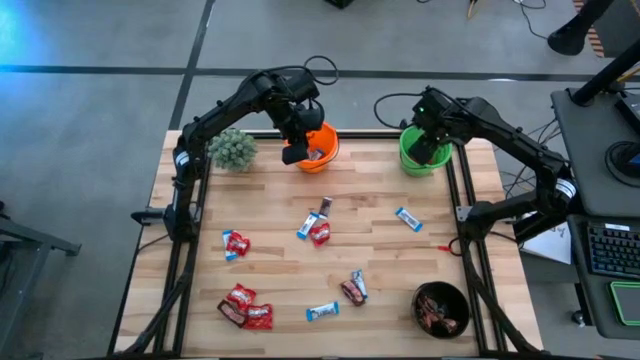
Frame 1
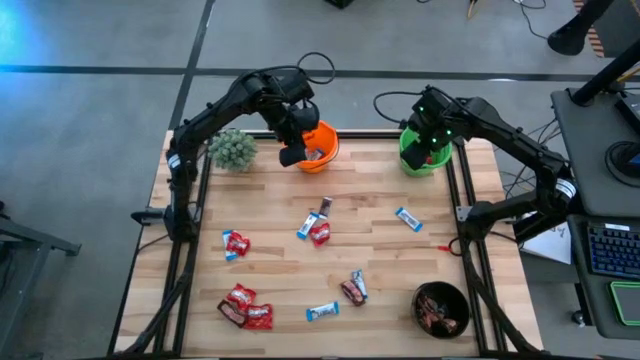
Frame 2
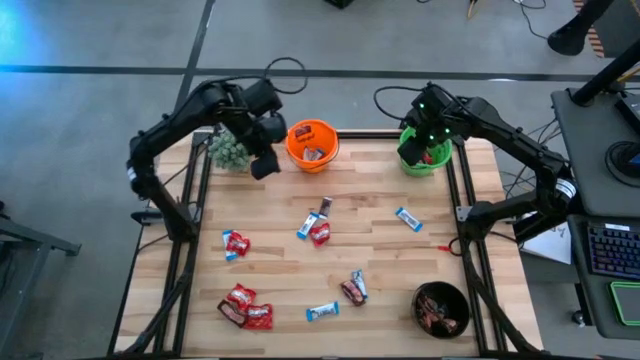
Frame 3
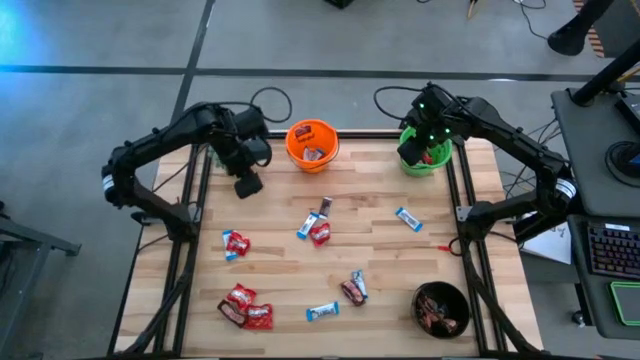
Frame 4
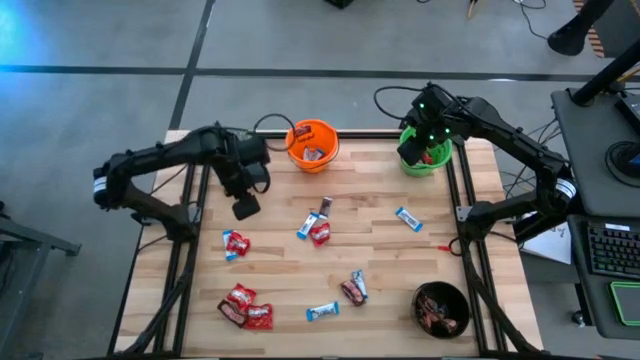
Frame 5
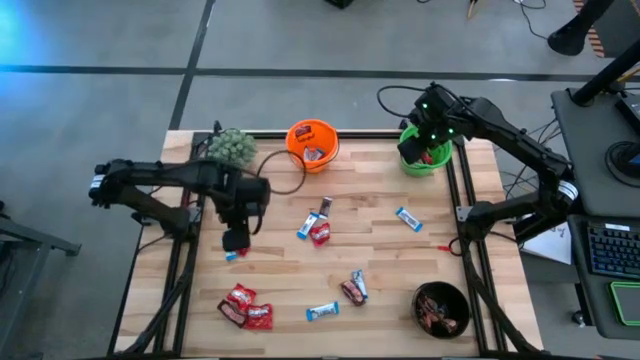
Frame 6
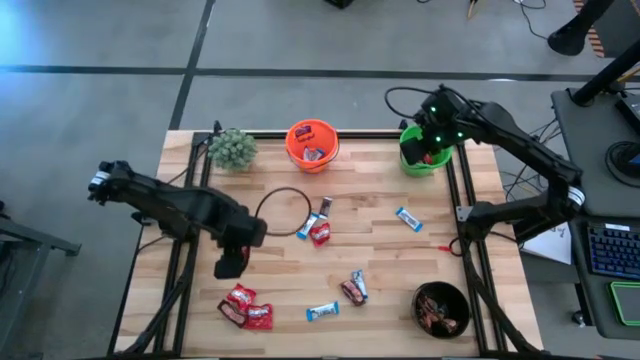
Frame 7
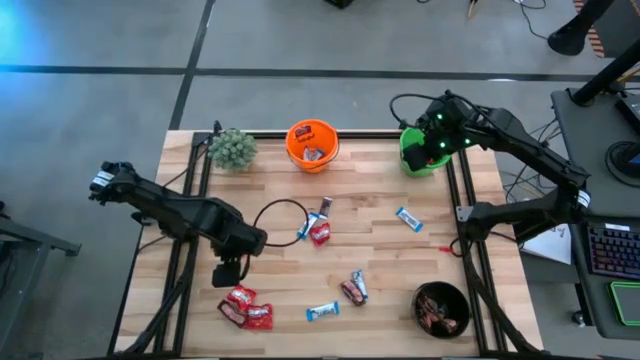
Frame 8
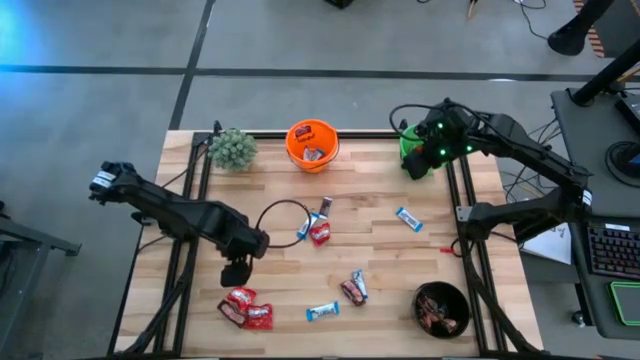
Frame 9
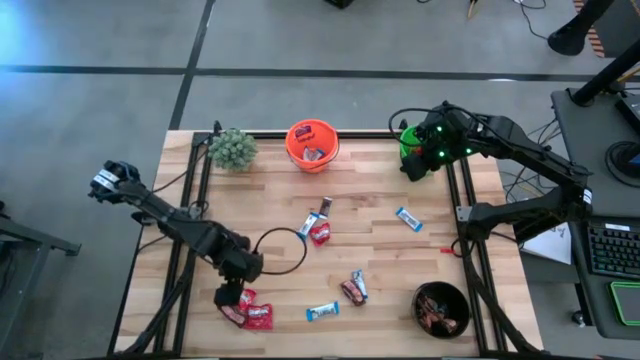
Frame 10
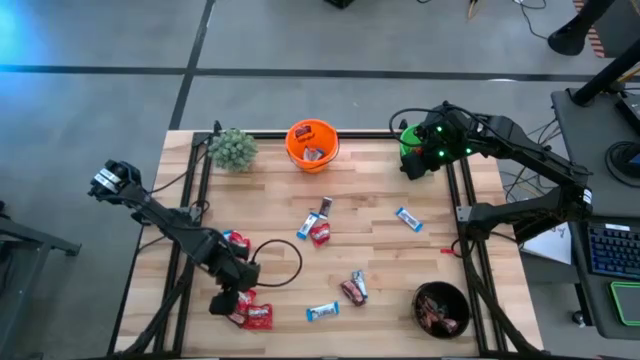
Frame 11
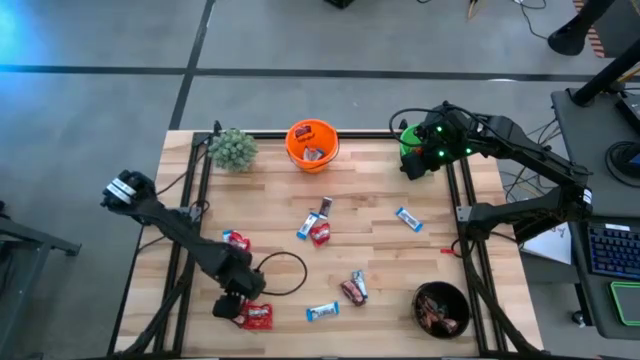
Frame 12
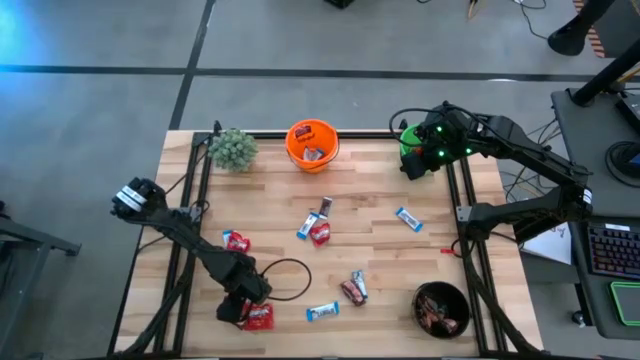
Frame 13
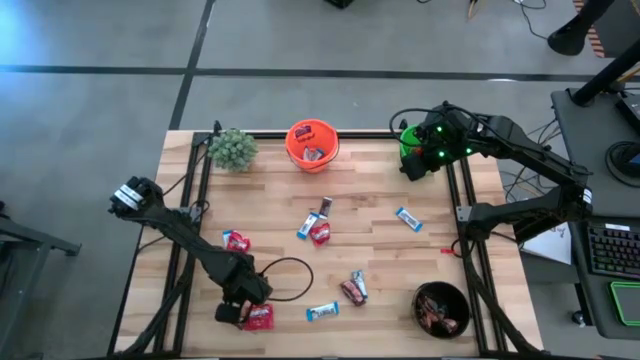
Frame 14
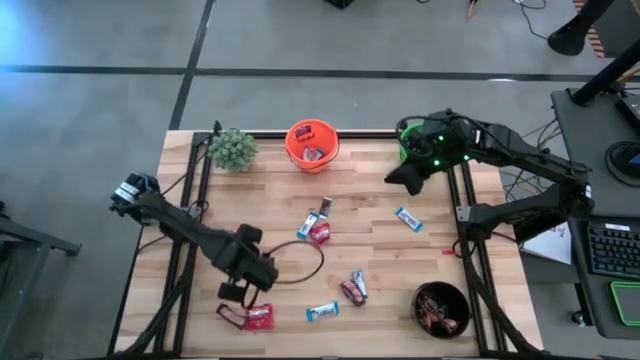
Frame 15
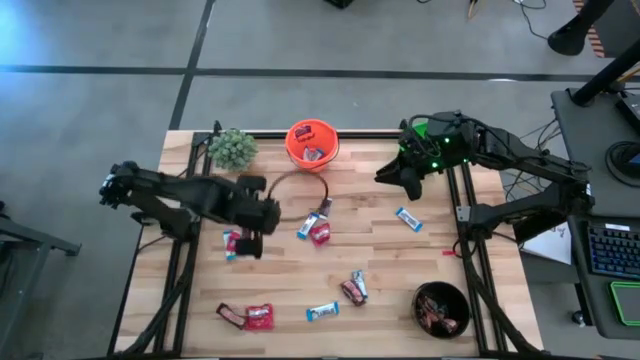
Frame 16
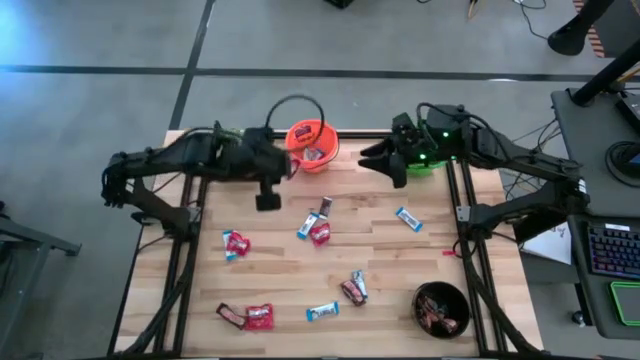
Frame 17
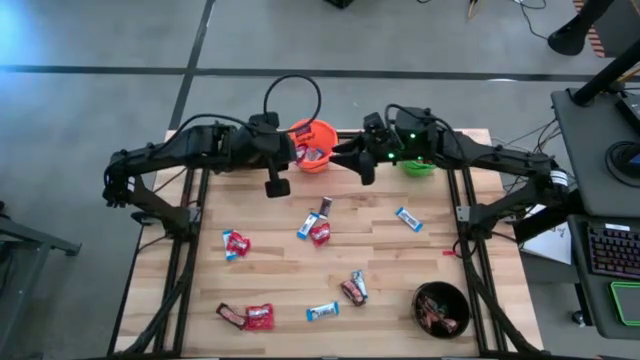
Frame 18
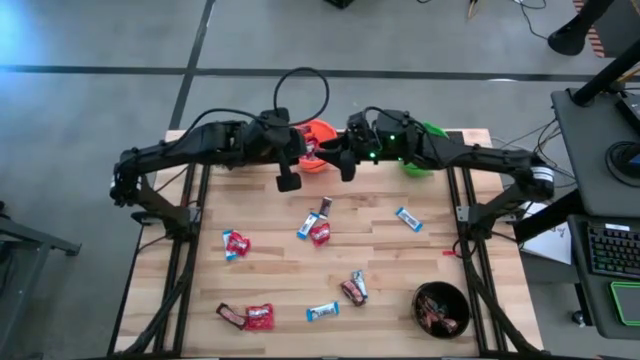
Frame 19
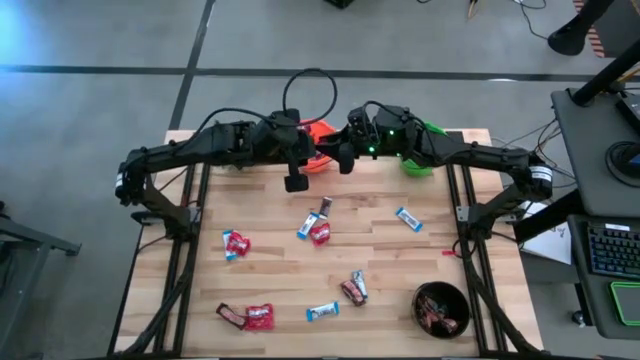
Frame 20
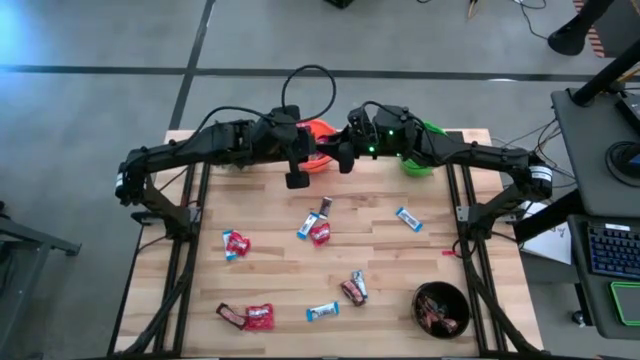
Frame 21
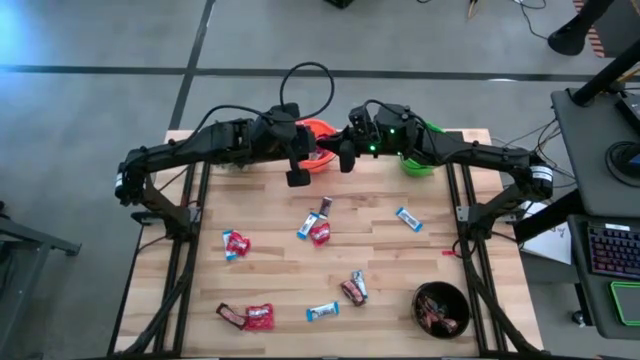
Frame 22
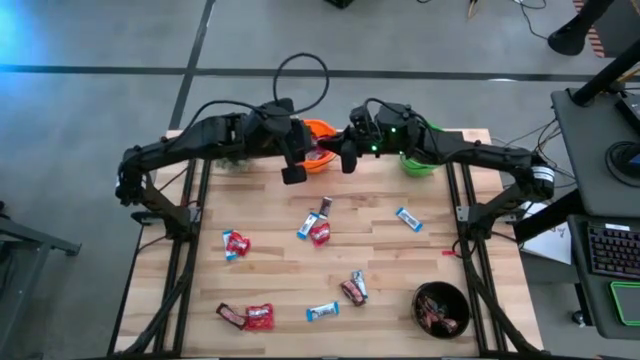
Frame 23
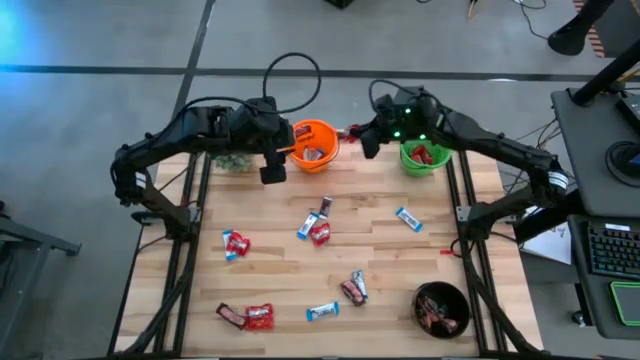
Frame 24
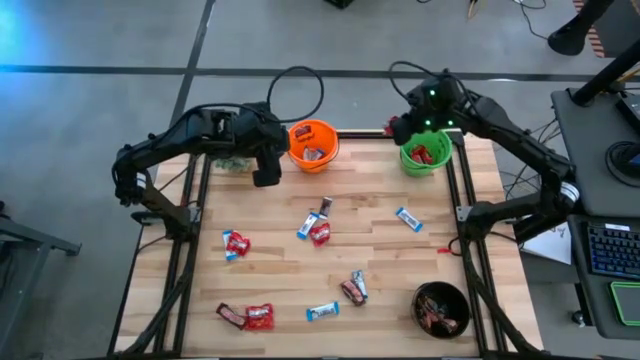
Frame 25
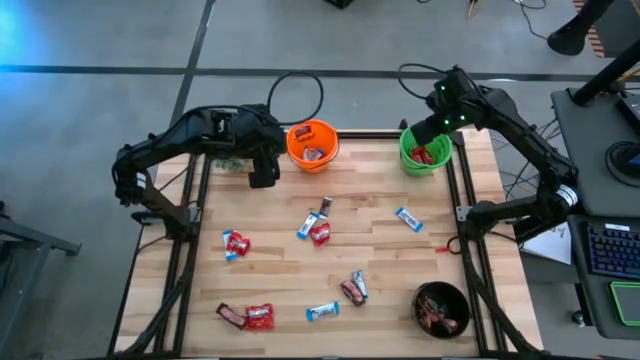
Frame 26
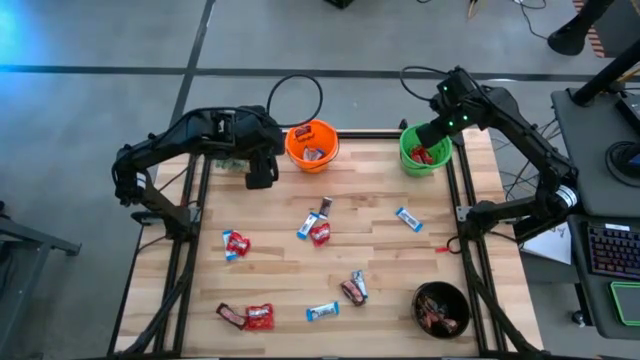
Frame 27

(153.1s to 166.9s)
Task: Sort candy
Put the red candy into the green bucket

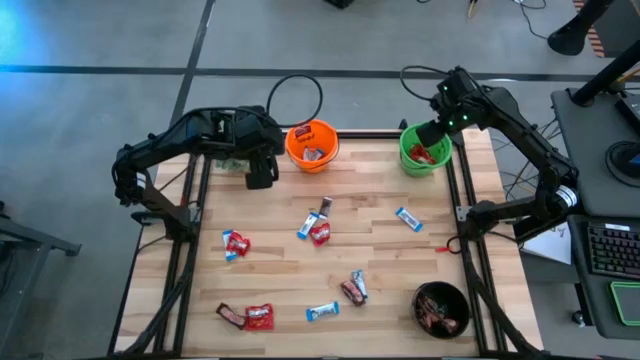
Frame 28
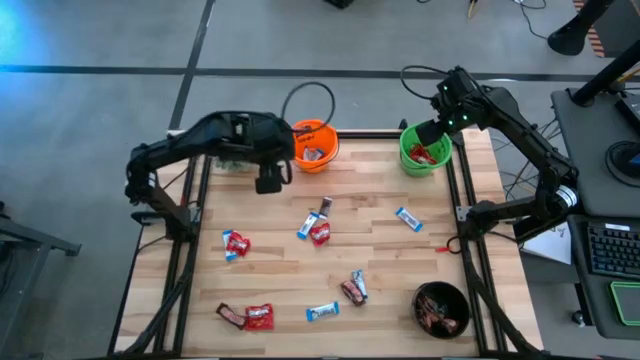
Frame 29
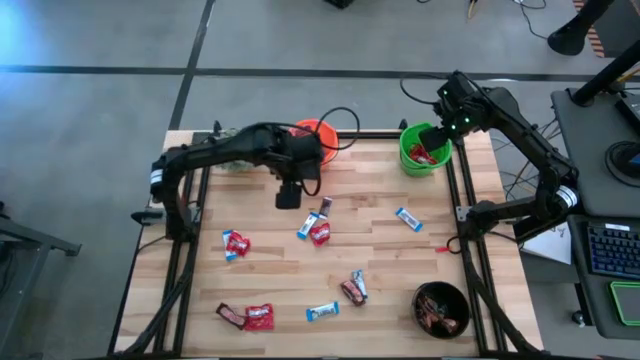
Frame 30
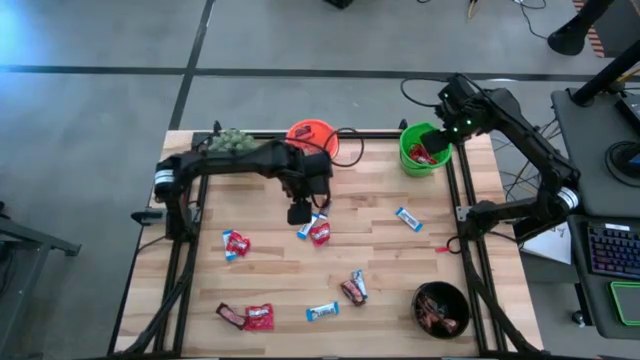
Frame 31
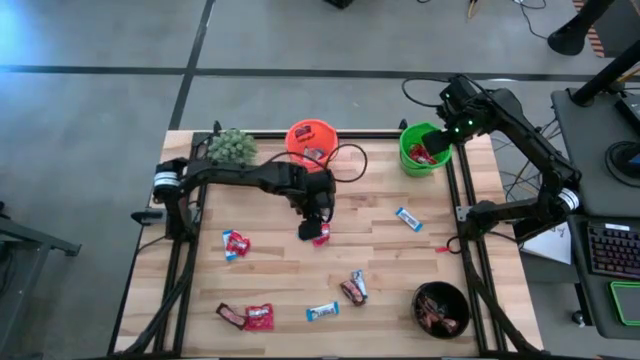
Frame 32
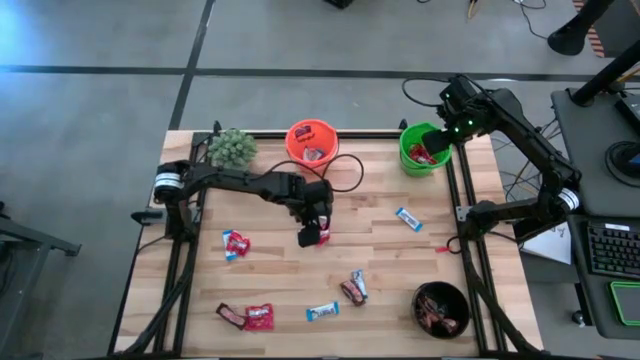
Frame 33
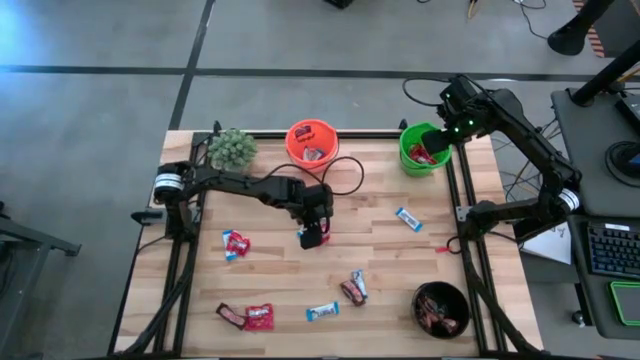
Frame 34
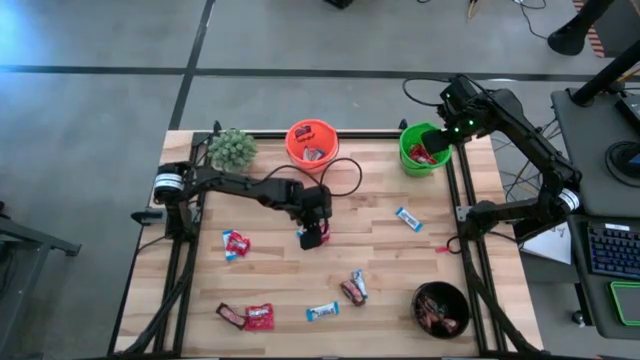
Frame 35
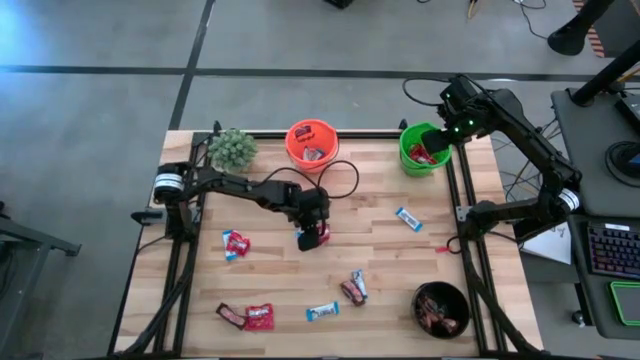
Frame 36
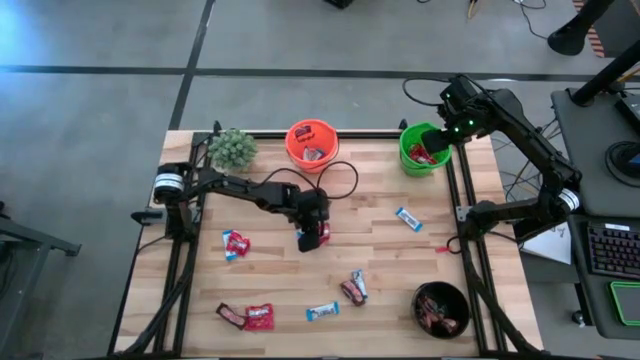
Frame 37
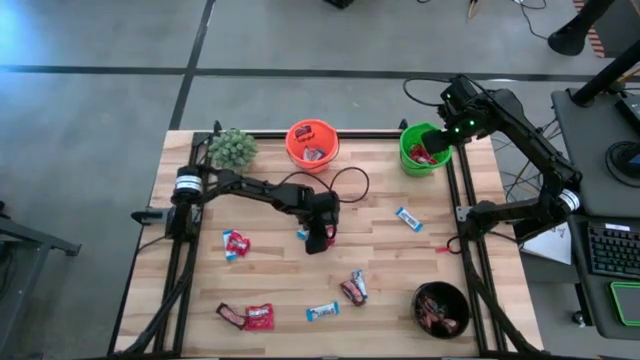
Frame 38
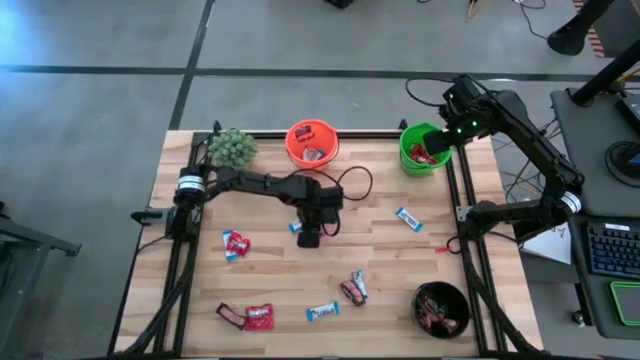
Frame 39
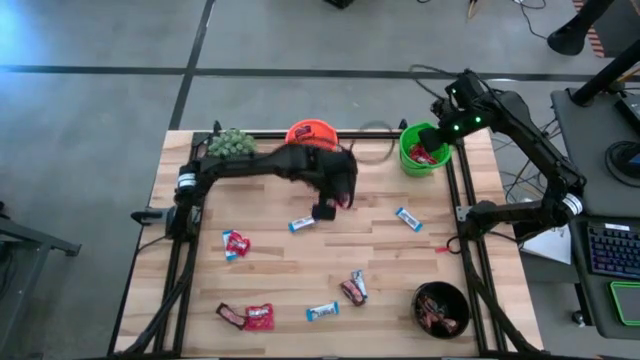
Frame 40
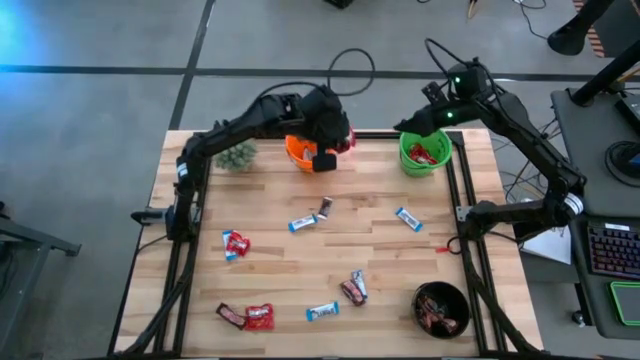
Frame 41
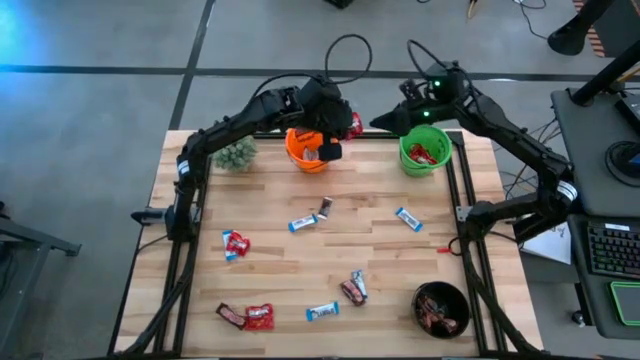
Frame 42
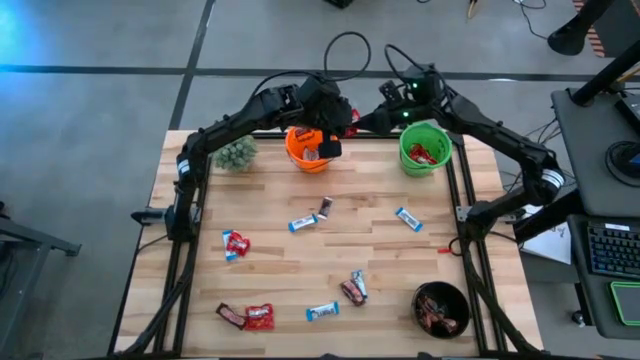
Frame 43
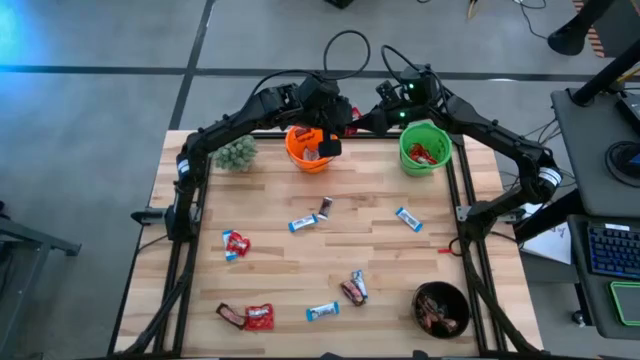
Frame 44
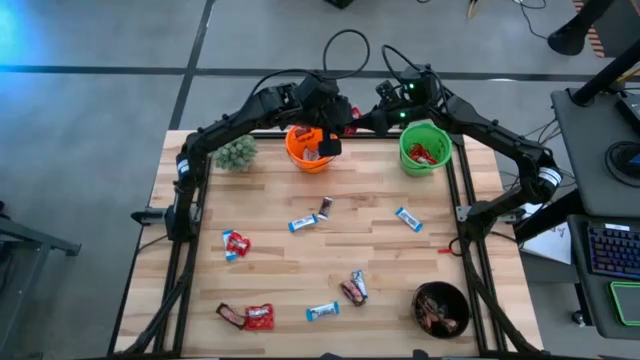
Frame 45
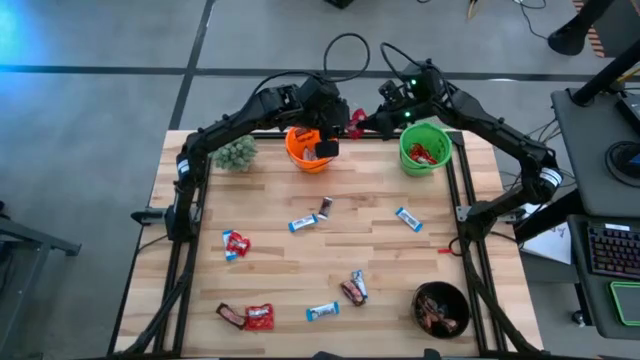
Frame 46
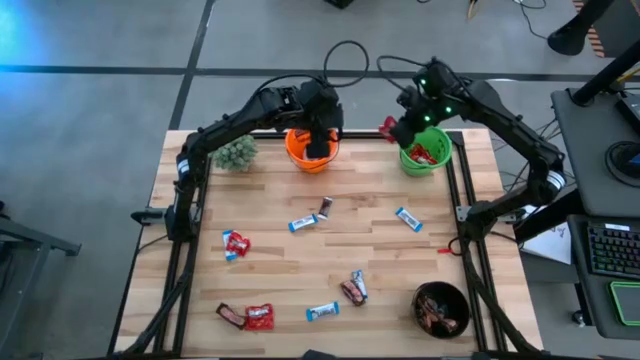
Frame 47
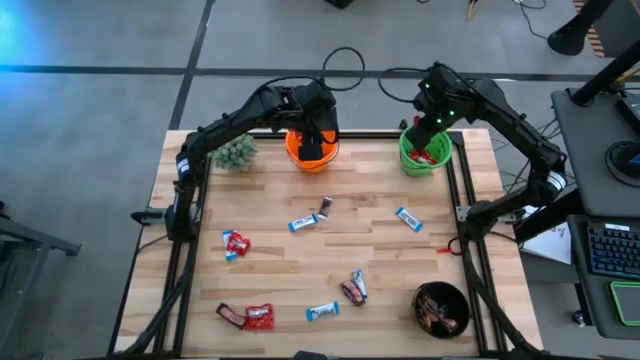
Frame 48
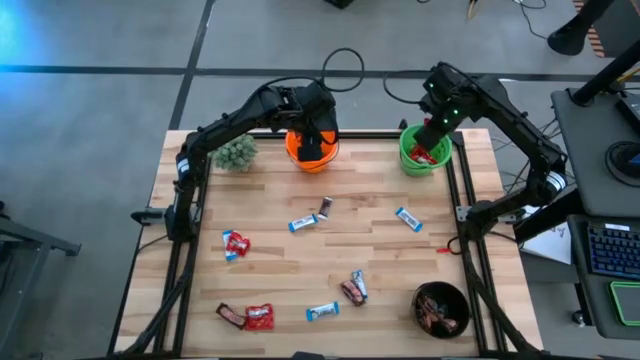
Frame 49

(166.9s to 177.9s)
Put the red candy into the green bucket
